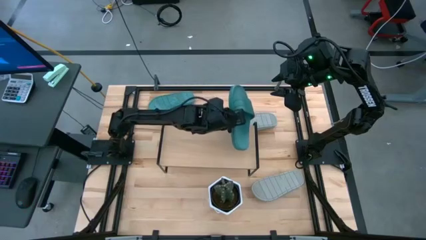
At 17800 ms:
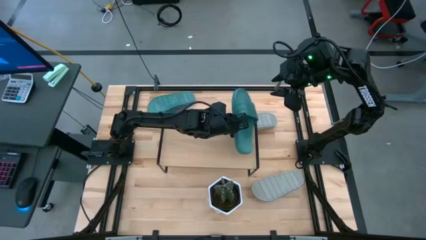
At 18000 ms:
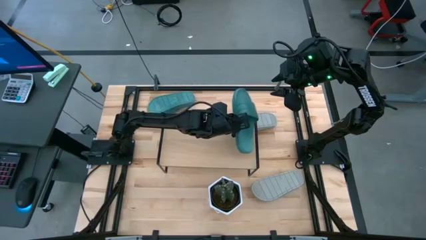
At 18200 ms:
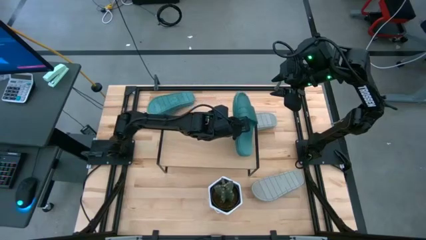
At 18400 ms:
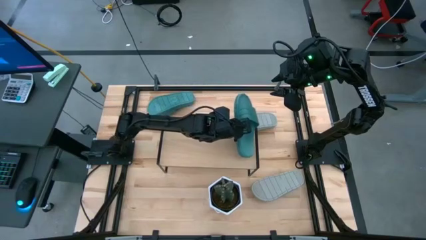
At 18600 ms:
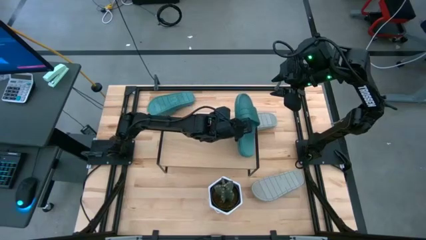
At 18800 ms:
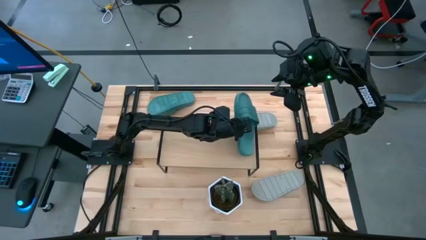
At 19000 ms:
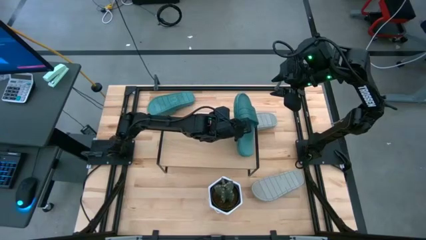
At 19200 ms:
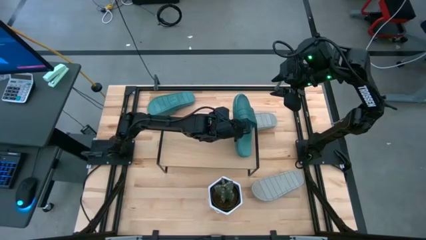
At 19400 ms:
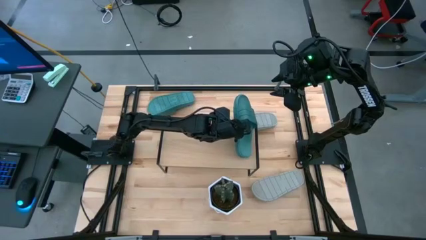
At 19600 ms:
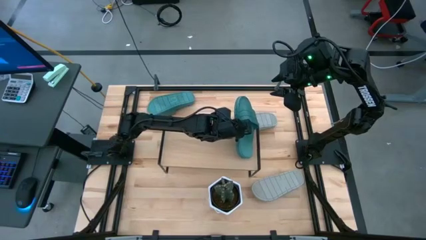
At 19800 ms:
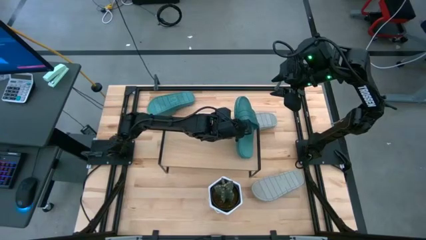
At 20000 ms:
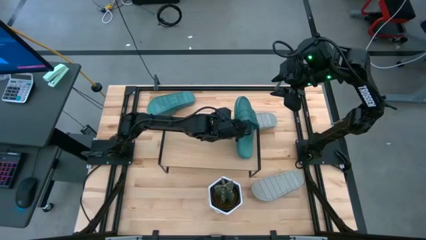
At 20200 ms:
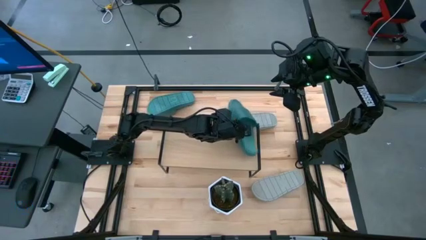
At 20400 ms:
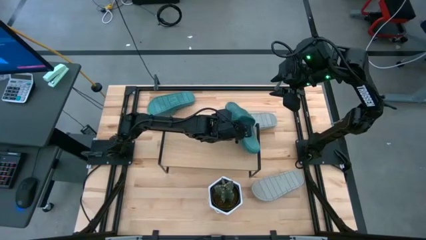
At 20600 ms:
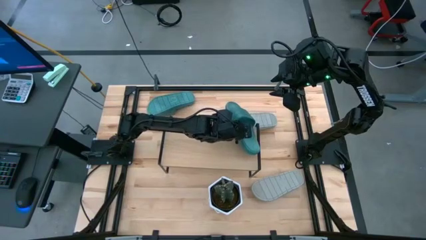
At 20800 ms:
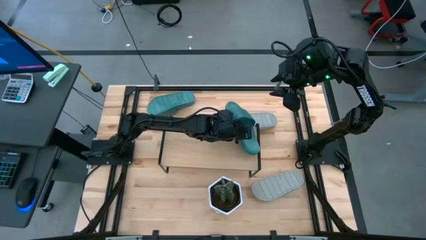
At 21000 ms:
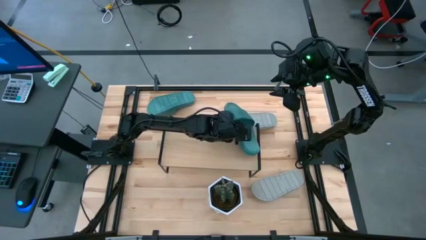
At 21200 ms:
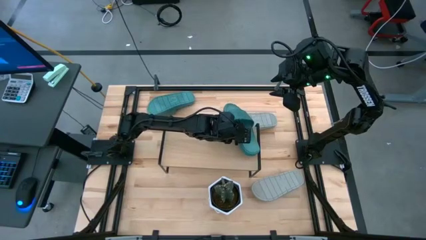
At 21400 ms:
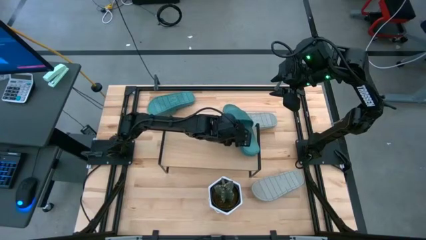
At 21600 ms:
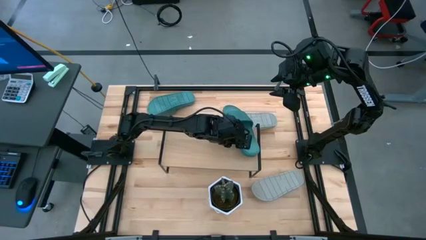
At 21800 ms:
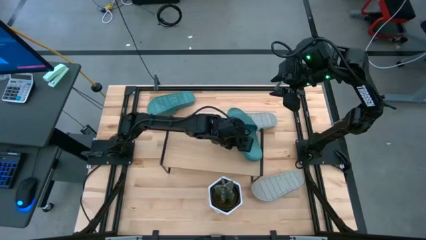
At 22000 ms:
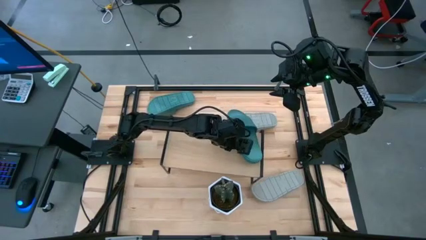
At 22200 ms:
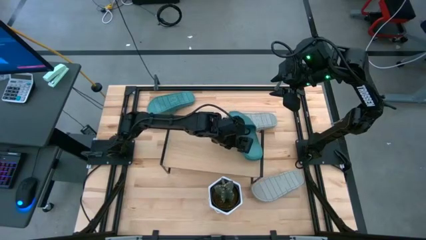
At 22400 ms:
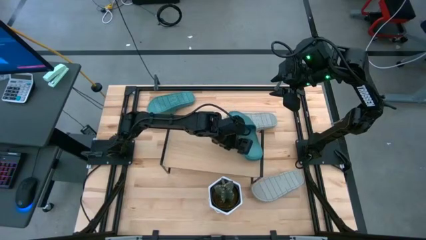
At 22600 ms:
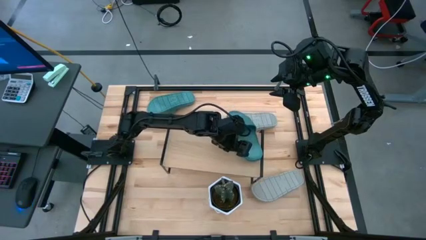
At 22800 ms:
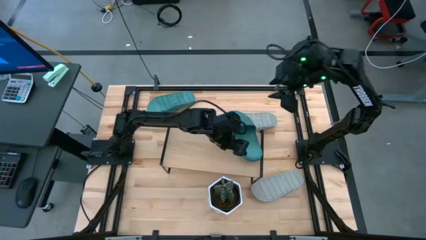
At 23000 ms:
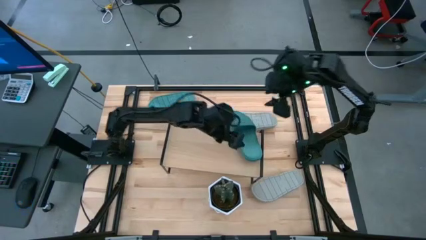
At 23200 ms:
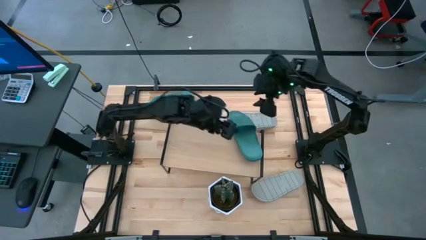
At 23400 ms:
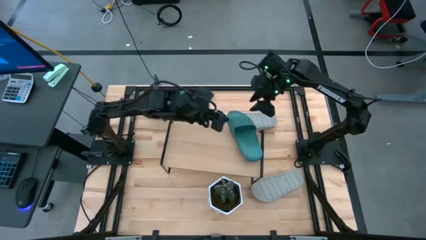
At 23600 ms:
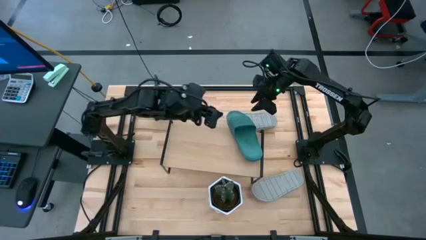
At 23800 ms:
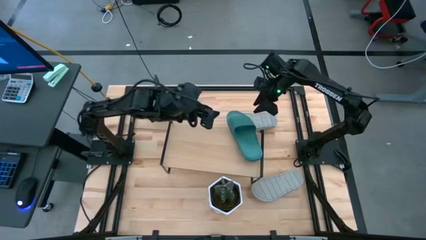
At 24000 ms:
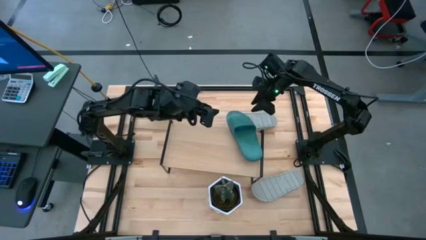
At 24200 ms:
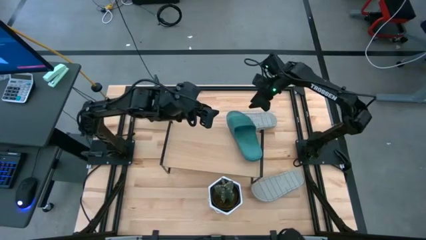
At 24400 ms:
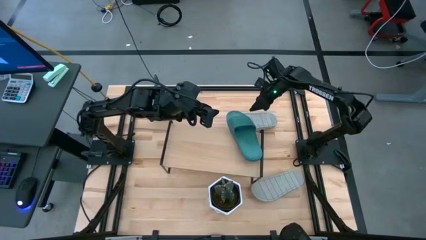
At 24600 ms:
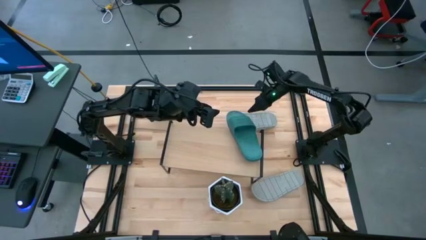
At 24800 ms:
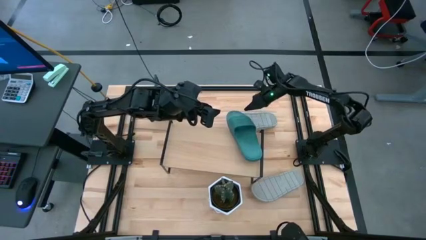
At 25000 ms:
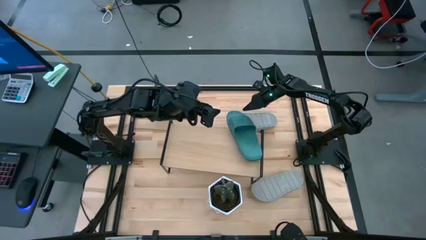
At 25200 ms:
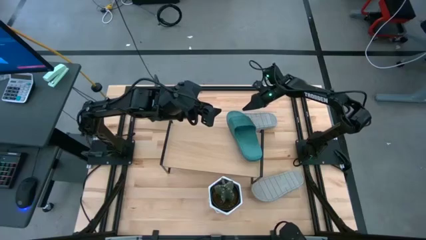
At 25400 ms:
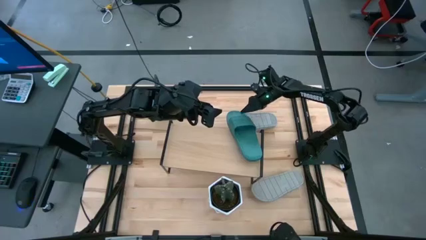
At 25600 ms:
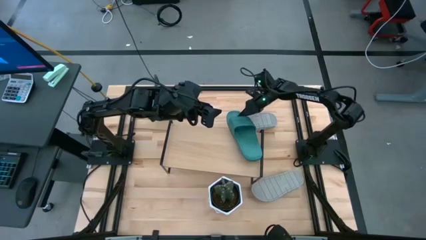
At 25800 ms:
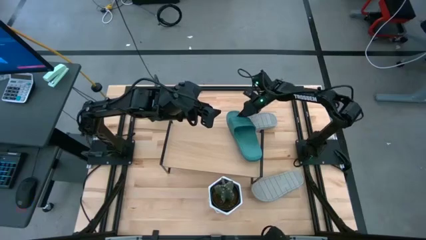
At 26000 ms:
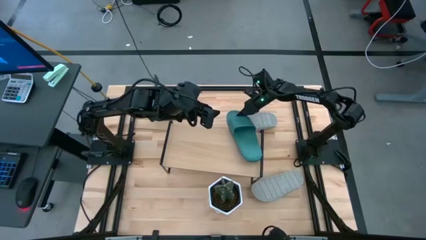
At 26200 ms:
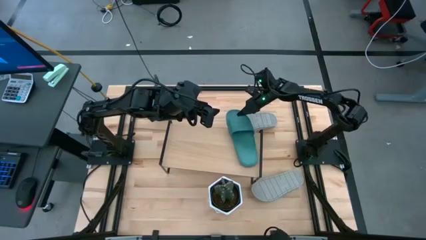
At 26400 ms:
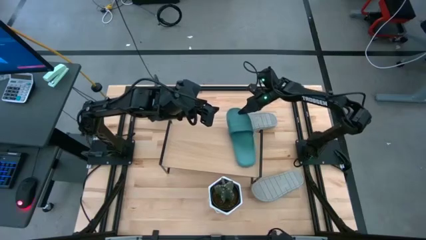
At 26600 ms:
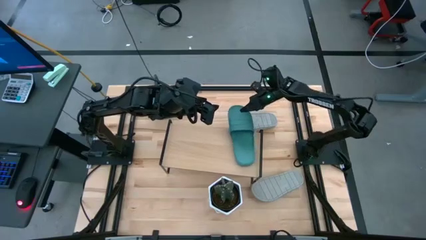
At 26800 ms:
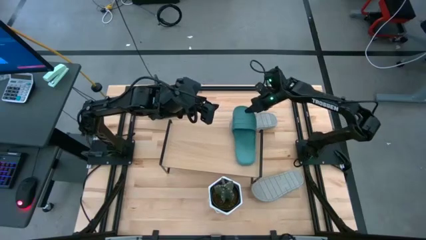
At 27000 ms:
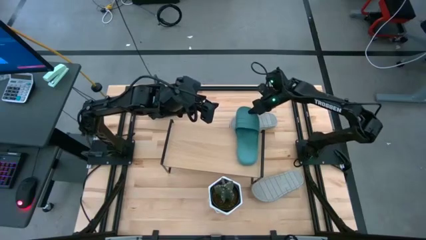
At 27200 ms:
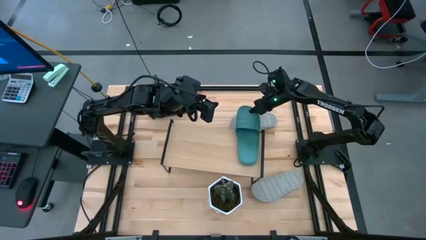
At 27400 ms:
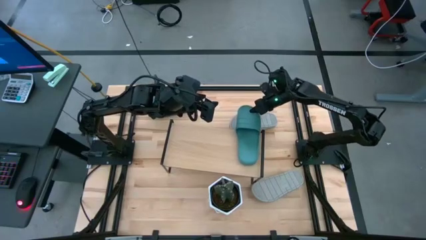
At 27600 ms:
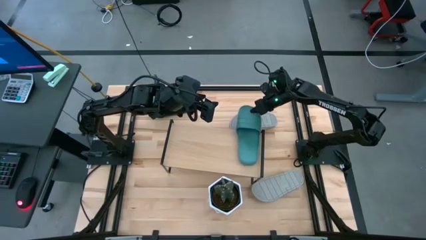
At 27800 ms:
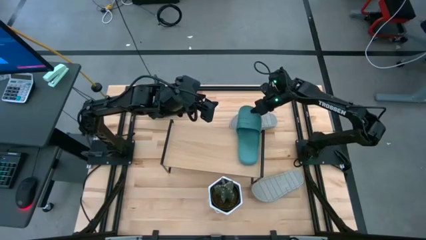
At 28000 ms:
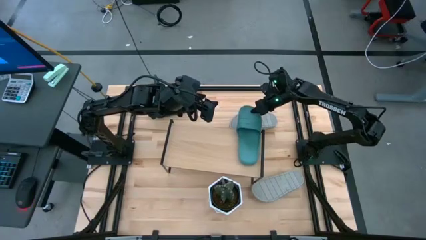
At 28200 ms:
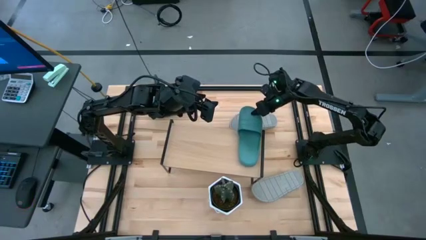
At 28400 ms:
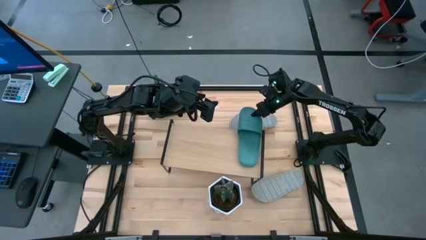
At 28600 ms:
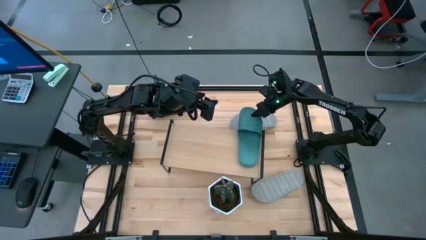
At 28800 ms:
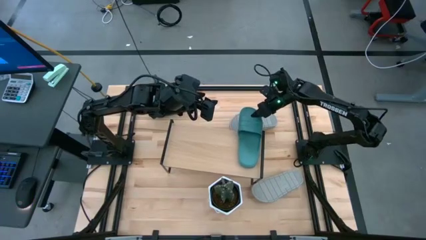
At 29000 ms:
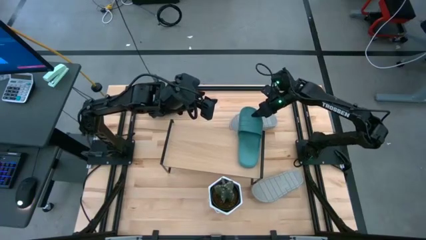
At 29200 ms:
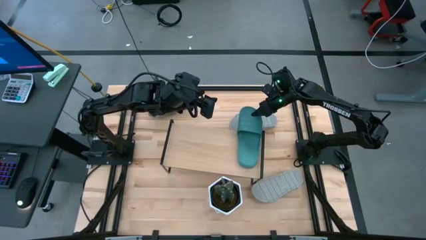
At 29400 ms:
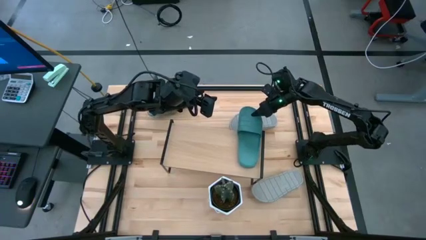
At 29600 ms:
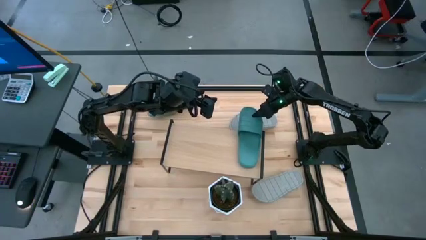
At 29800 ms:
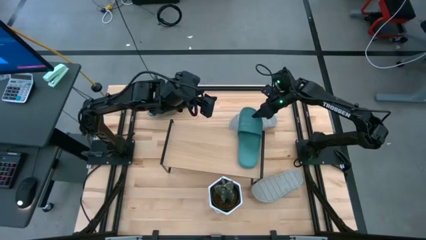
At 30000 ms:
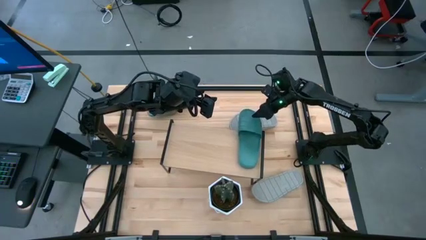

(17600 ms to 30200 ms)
Task: Pick and place slides into the shelf
Put the right green slide on the shelf

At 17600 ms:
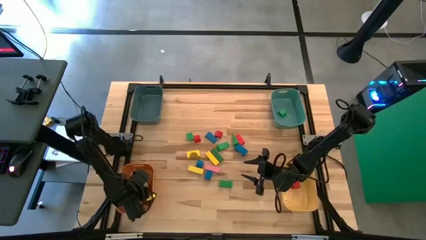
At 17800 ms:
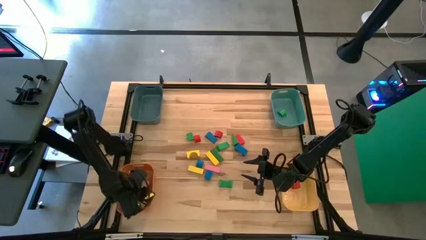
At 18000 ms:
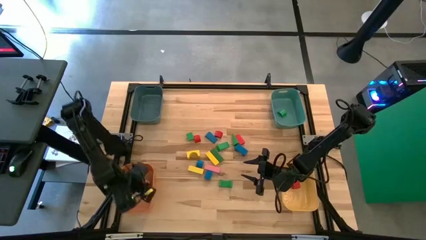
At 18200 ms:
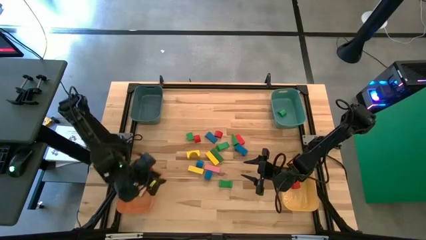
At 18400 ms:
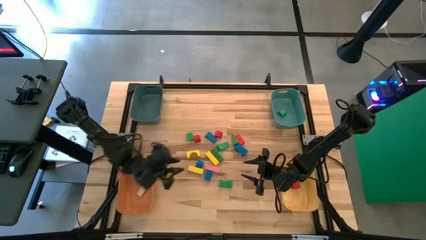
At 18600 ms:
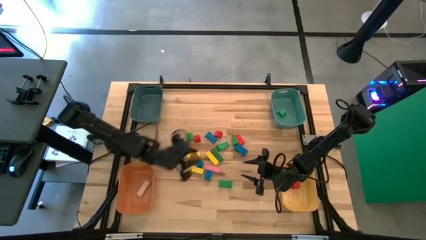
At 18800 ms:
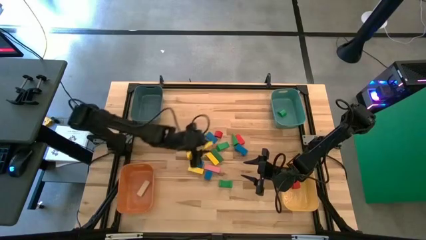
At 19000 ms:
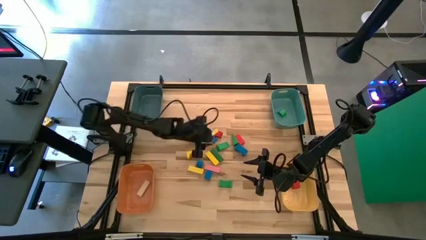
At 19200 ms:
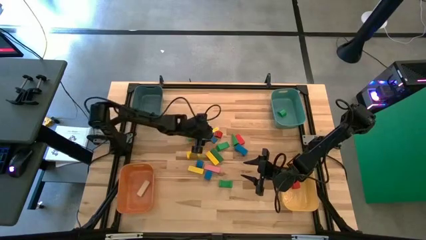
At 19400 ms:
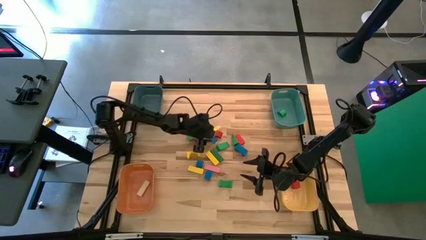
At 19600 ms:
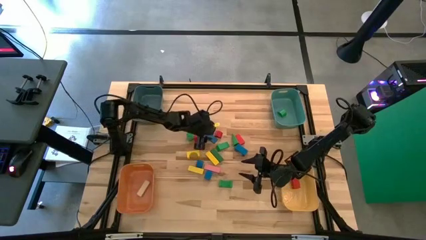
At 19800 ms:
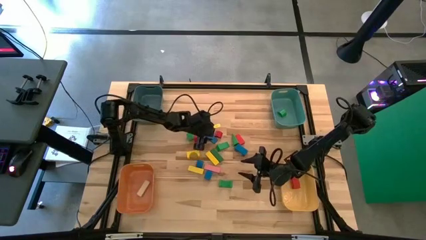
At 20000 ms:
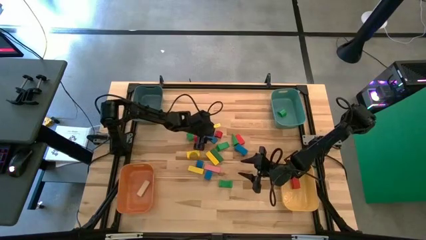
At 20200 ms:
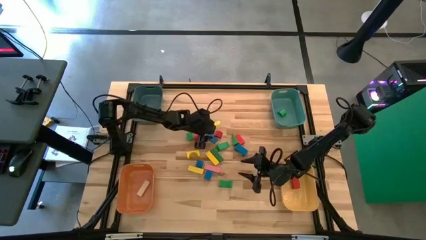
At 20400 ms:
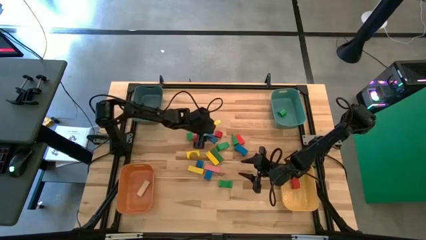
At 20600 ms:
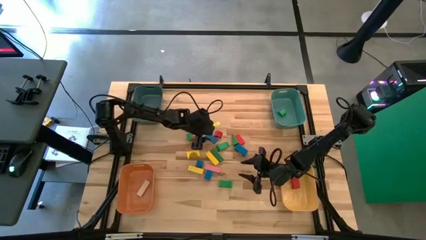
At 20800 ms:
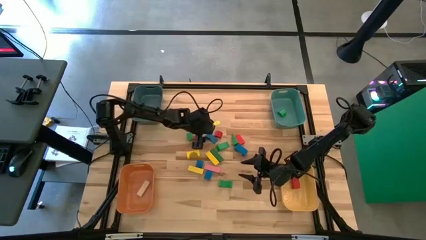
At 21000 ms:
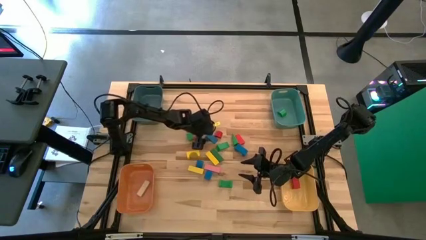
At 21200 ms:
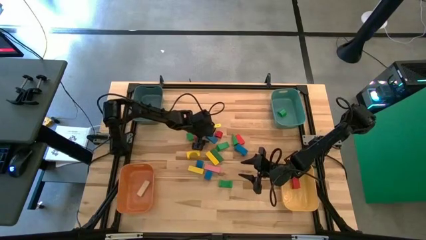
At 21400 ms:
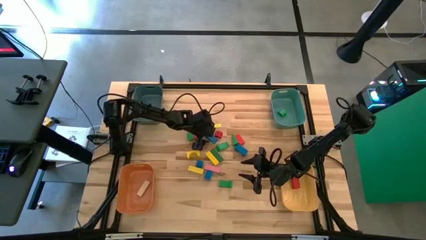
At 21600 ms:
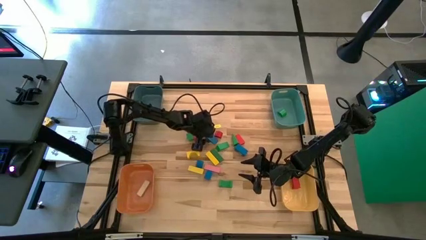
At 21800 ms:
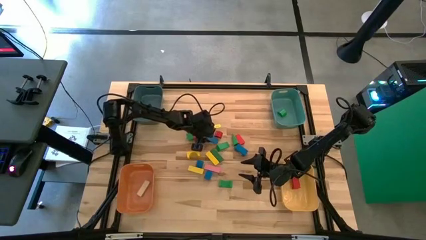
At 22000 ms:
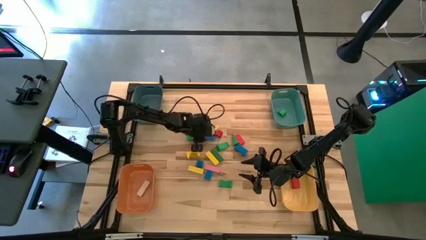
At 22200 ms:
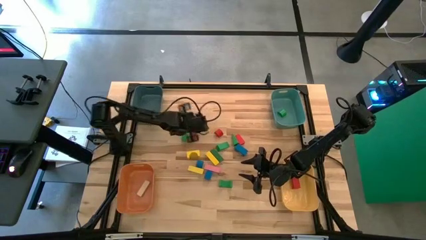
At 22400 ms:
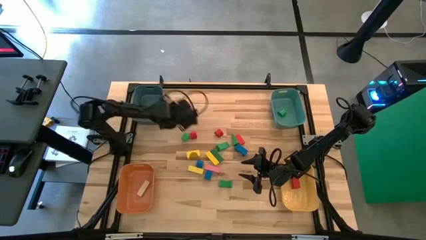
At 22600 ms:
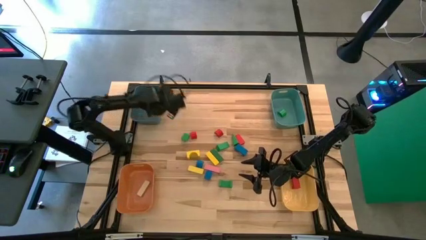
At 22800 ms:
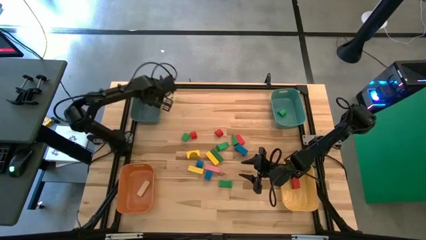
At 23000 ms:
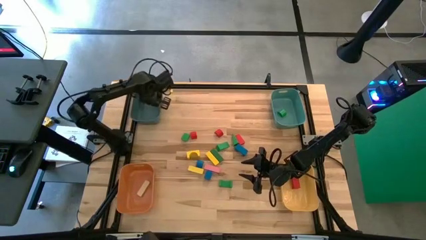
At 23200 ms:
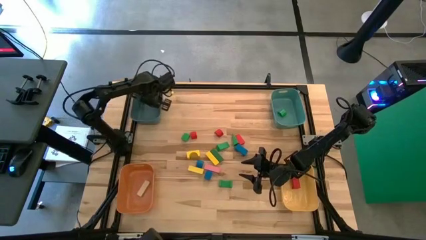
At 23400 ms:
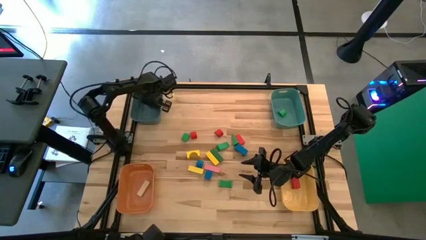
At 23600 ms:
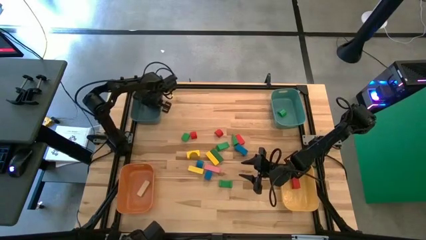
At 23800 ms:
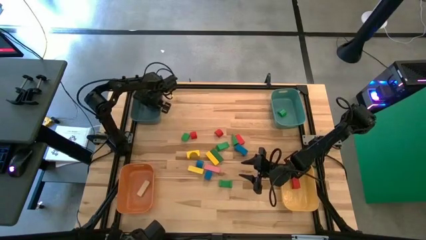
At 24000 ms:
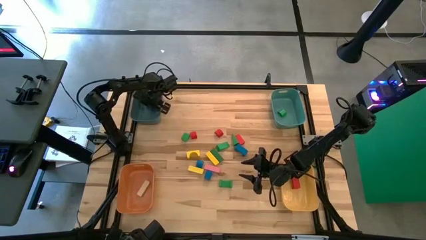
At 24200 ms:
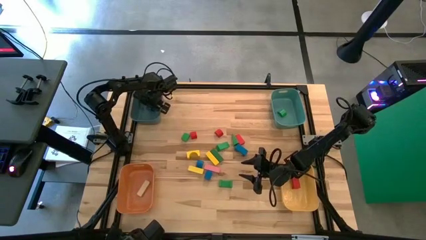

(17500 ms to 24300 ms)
Task: Sort blocks by size
Put the blue triangular block into the blue bin
